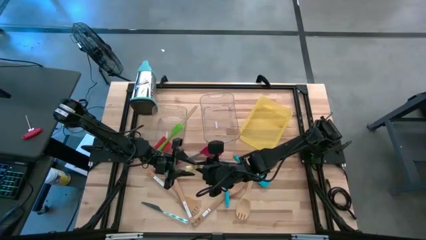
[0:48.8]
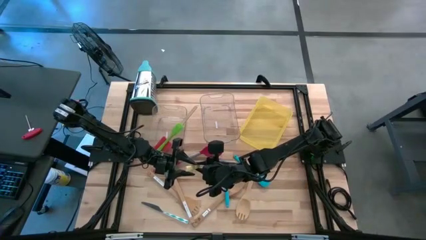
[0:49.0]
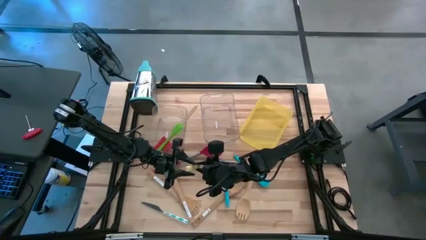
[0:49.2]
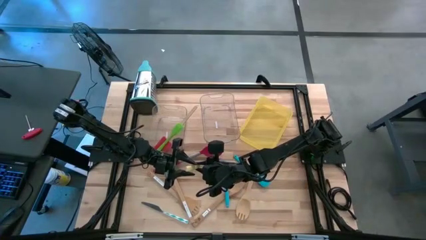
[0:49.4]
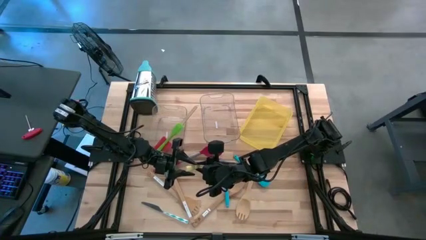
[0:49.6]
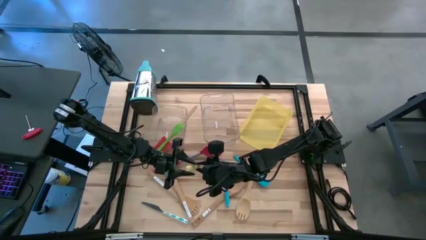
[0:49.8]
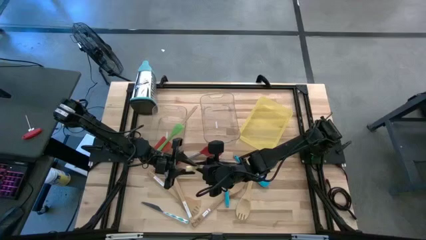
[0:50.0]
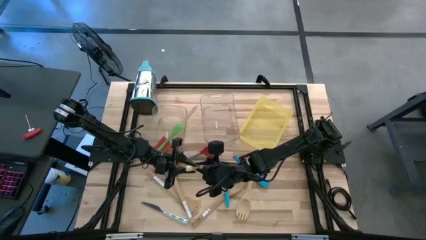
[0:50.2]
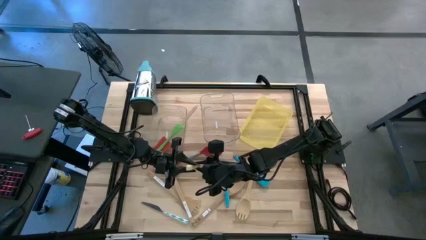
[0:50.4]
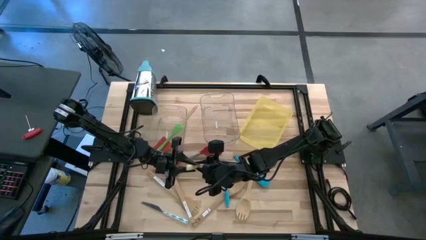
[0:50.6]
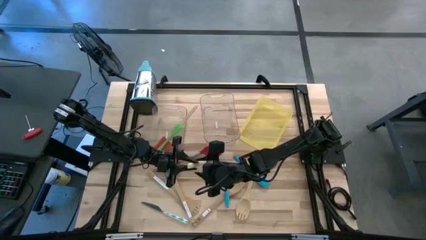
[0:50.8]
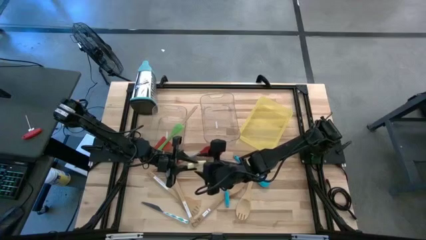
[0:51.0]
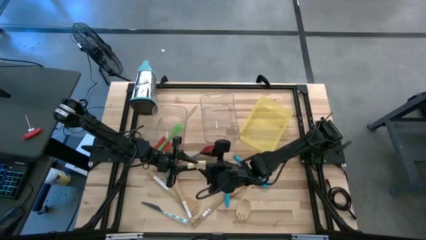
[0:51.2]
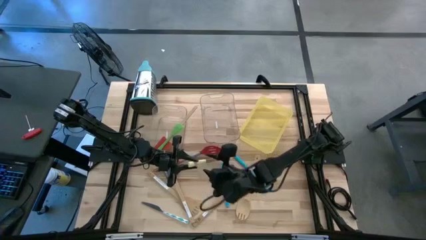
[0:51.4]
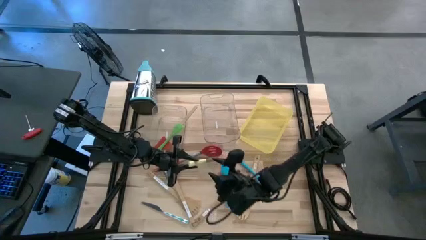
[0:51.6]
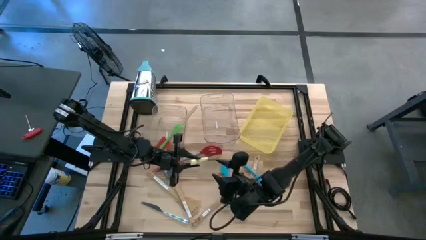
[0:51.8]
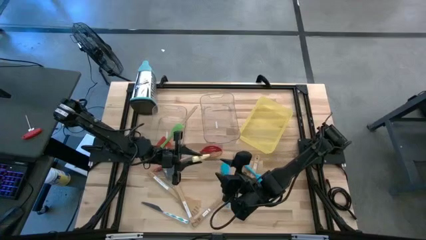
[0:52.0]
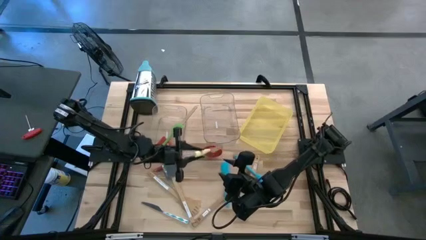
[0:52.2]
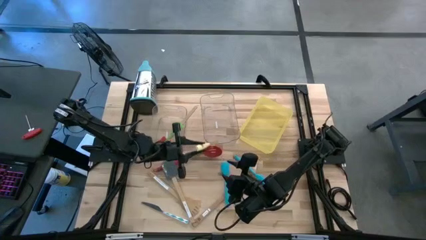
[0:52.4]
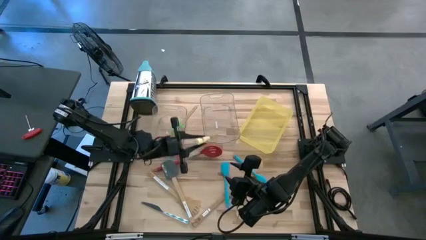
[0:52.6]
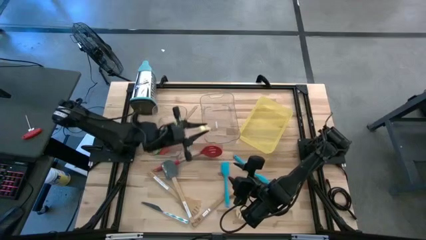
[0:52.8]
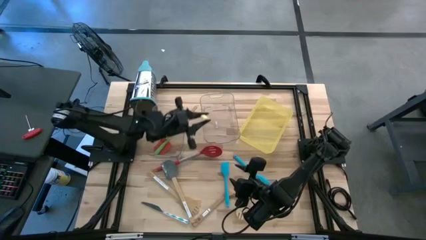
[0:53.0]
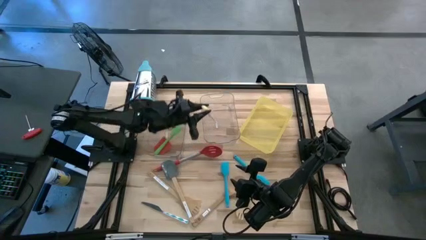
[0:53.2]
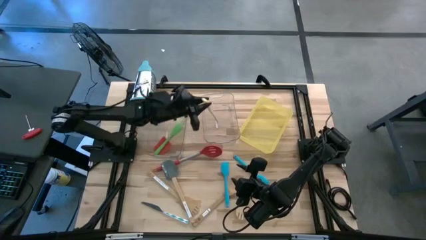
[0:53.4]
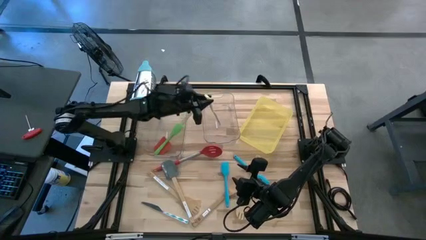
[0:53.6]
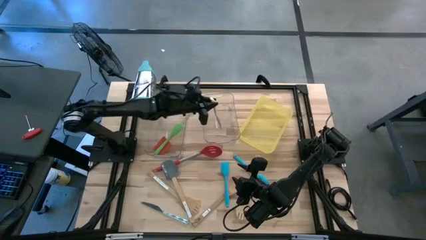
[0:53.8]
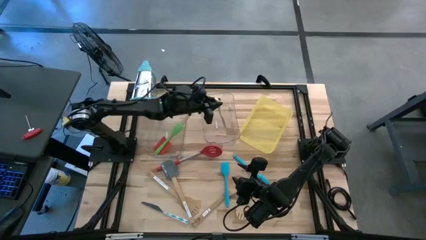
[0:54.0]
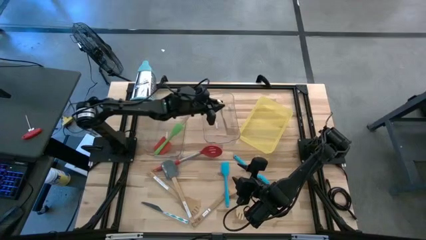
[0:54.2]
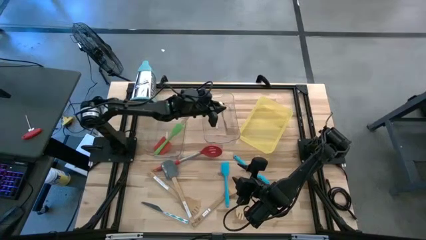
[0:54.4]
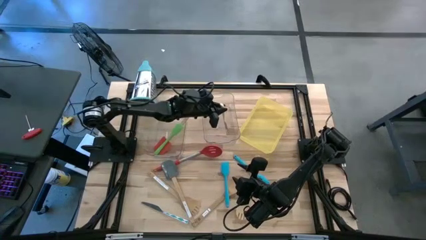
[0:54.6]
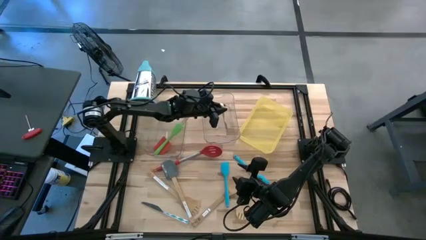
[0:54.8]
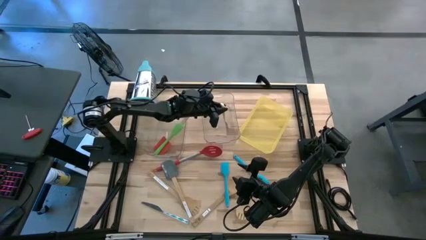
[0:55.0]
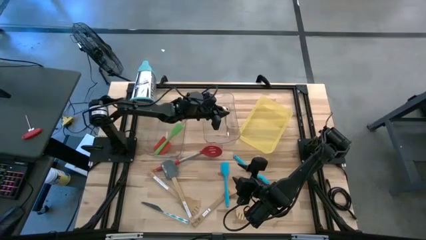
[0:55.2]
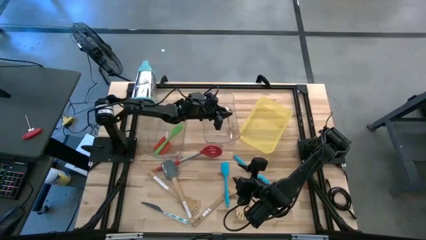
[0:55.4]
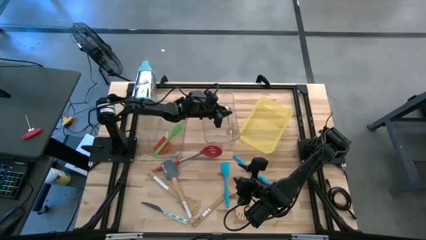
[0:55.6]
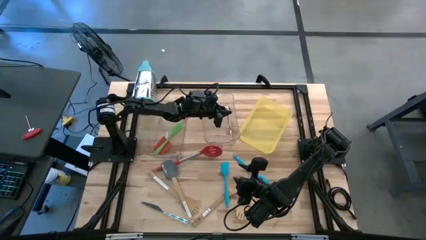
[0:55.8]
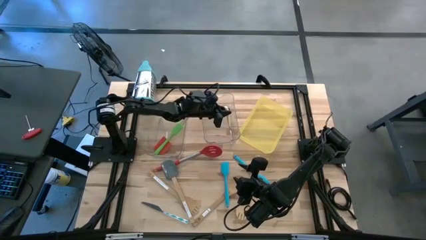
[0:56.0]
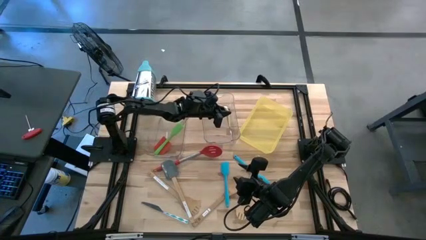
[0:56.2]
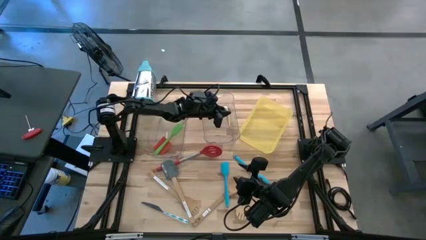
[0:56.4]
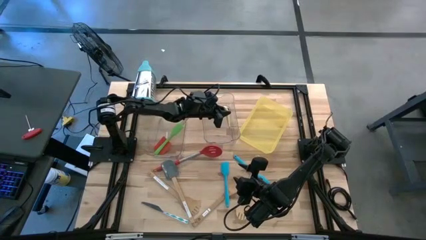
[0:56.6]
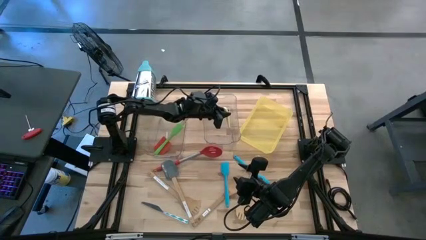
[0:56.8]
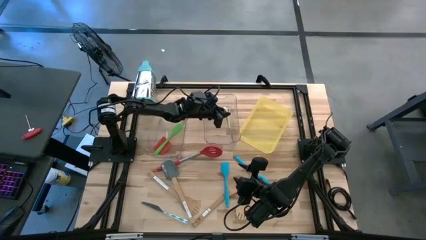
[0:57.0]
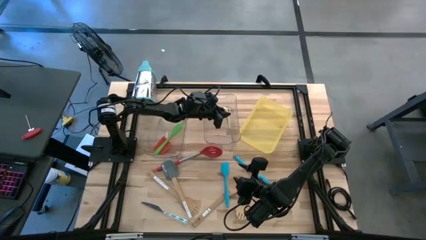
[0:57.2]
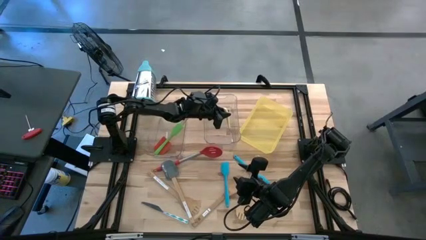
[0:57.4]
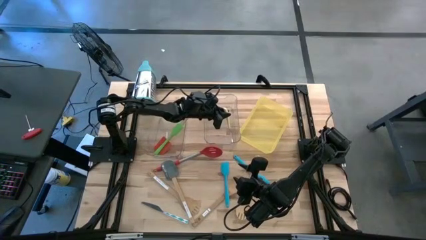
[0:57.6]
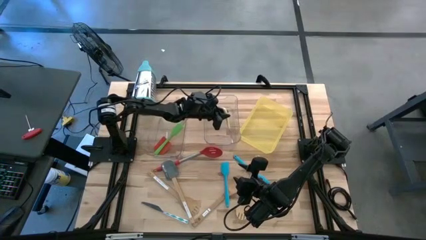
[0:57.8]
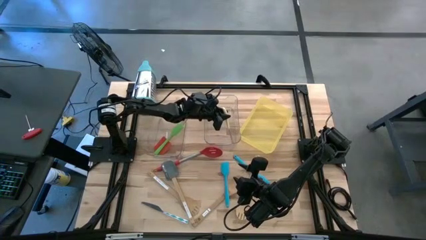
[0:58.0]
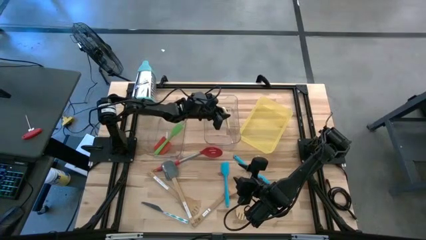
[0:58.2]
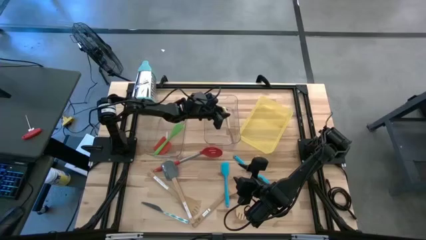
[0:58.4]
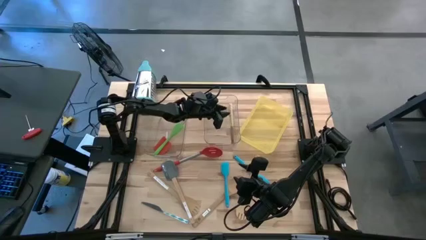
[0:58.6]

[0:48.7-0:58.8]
Task: Pick & Place Kitchen Items
Put the yellow knife into the right transparent bin
